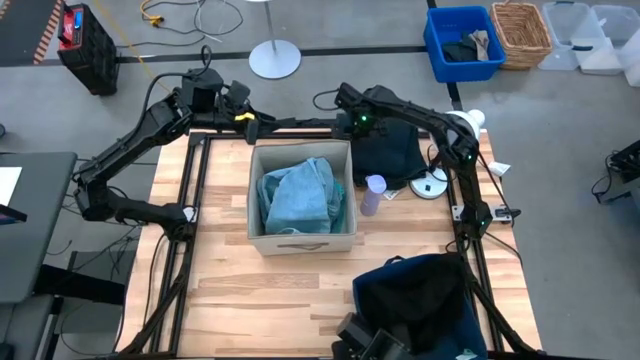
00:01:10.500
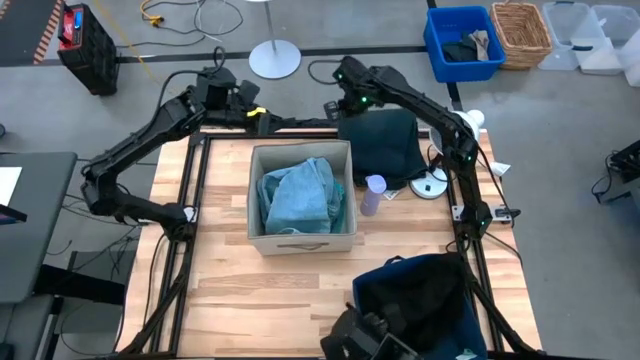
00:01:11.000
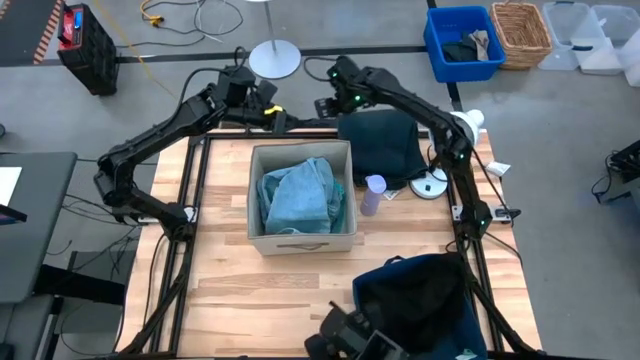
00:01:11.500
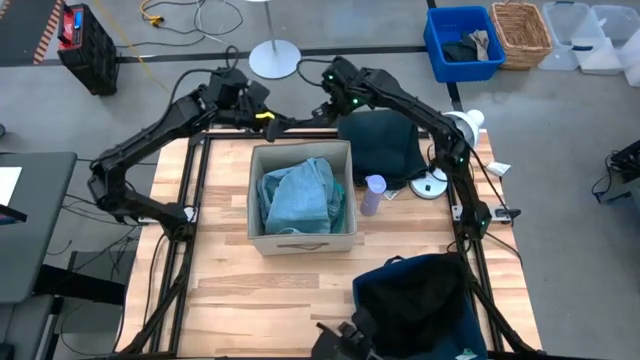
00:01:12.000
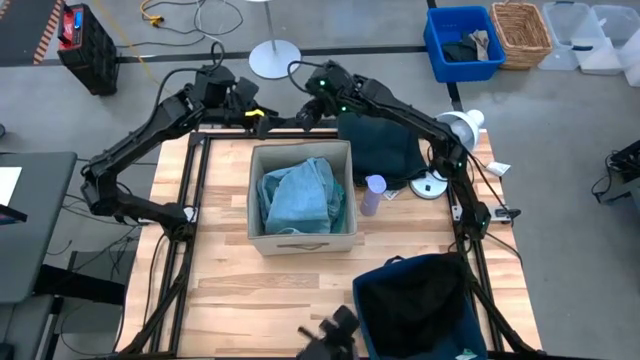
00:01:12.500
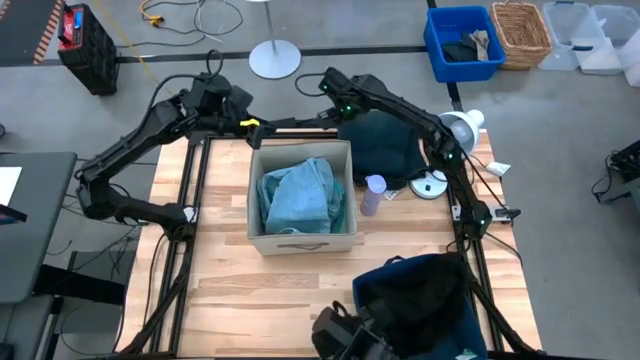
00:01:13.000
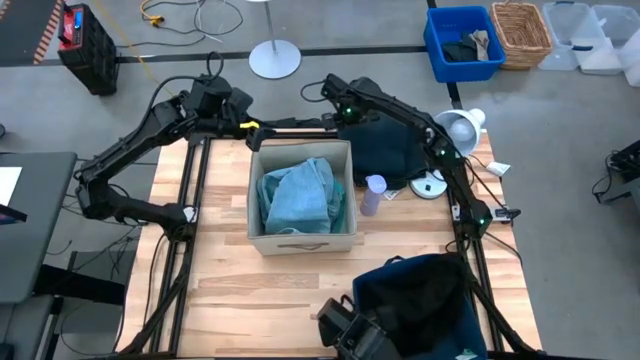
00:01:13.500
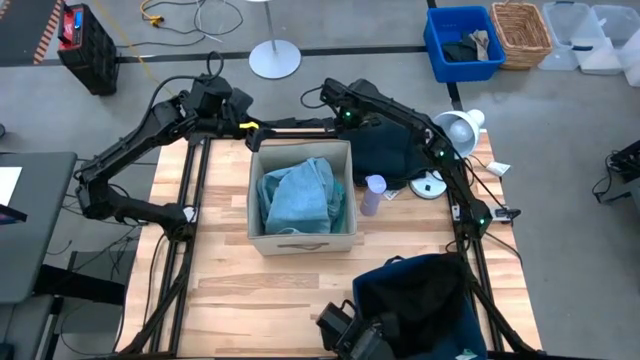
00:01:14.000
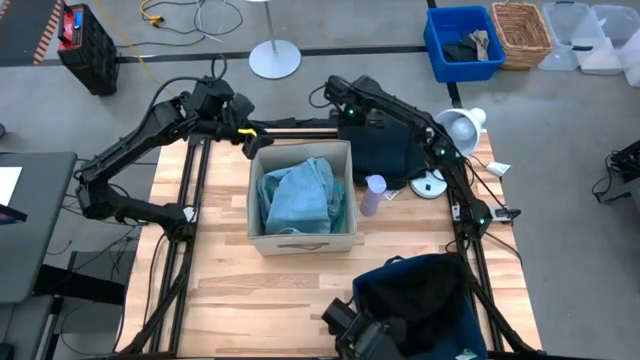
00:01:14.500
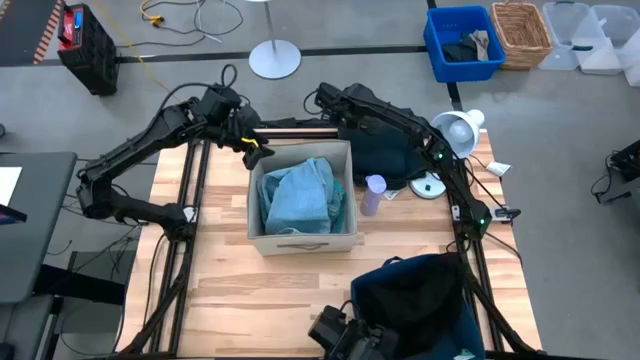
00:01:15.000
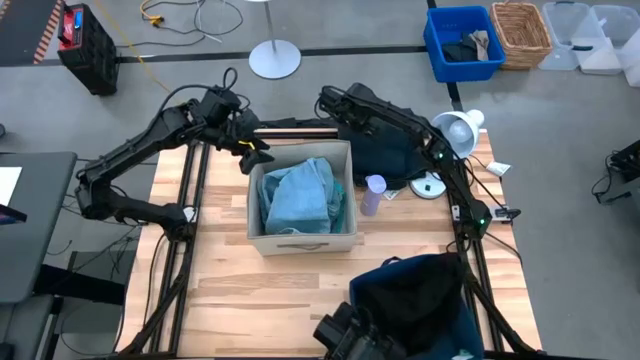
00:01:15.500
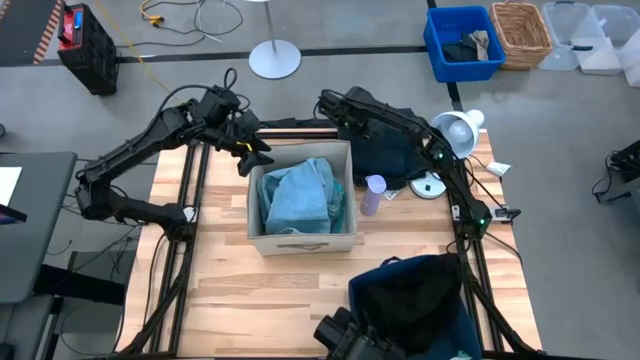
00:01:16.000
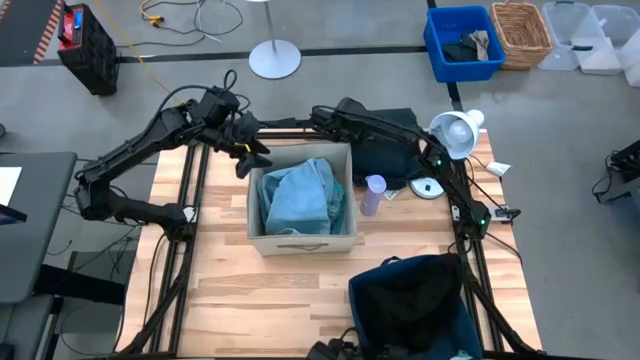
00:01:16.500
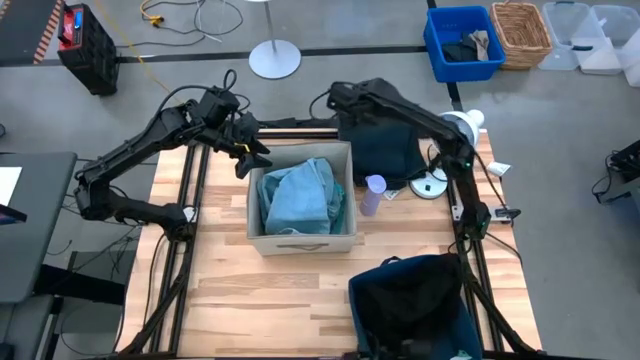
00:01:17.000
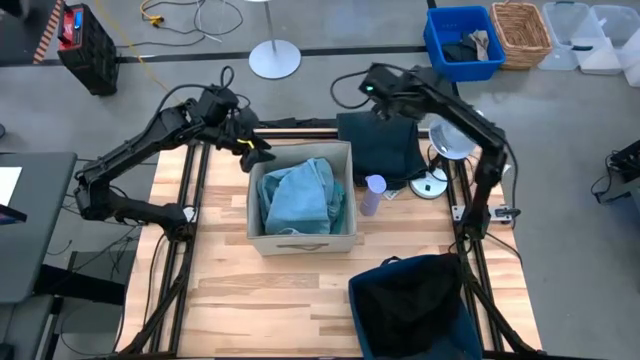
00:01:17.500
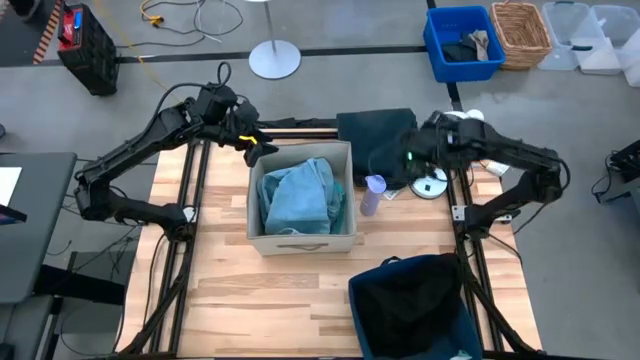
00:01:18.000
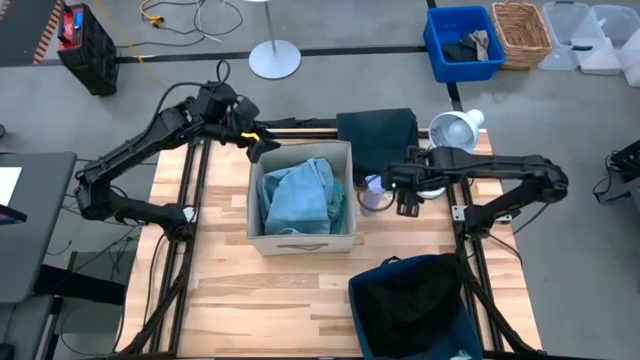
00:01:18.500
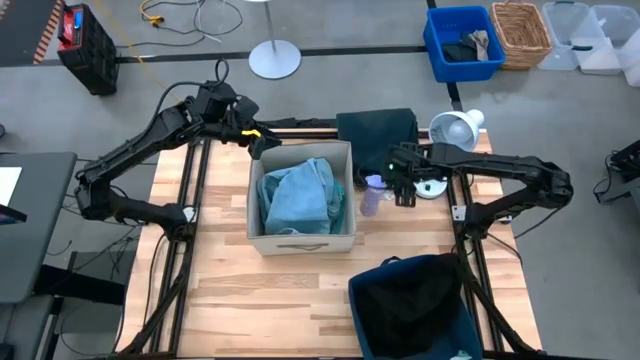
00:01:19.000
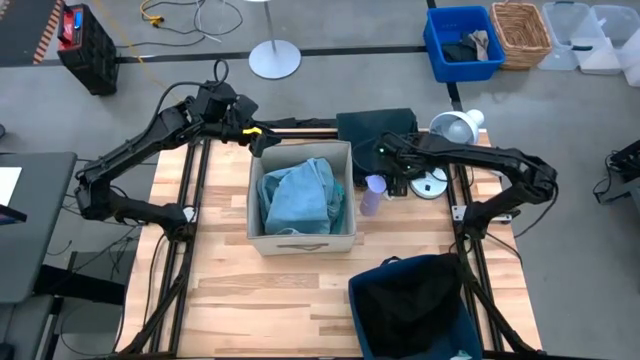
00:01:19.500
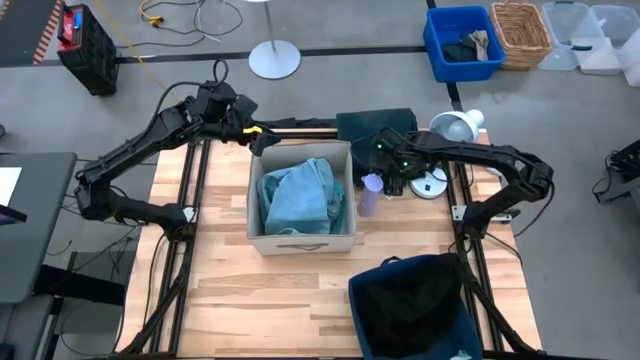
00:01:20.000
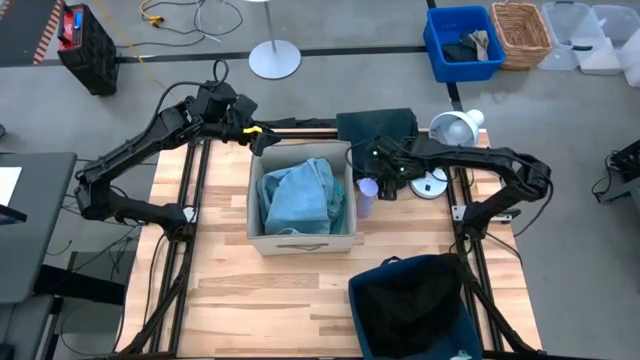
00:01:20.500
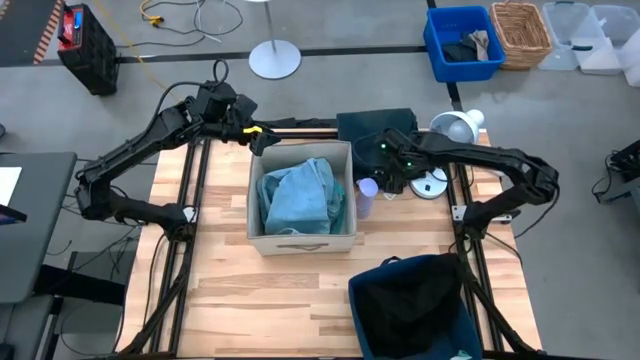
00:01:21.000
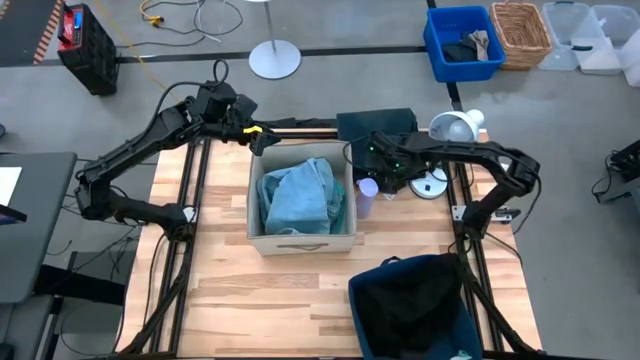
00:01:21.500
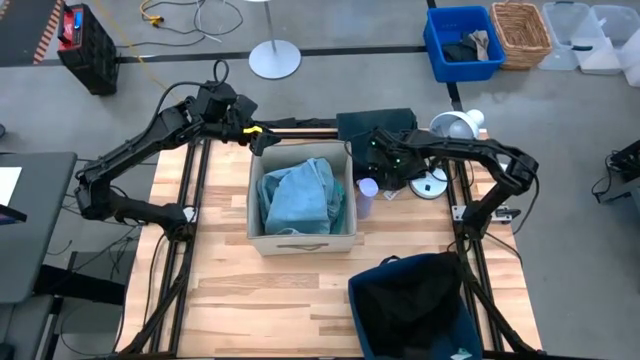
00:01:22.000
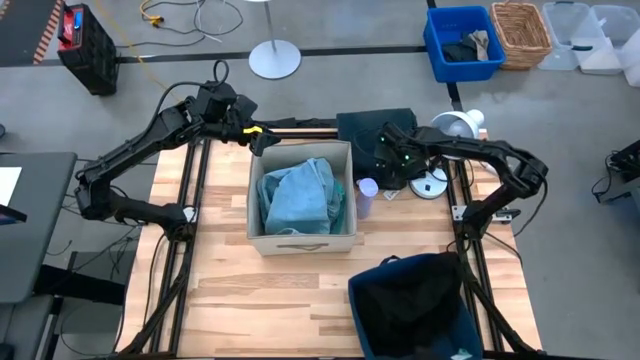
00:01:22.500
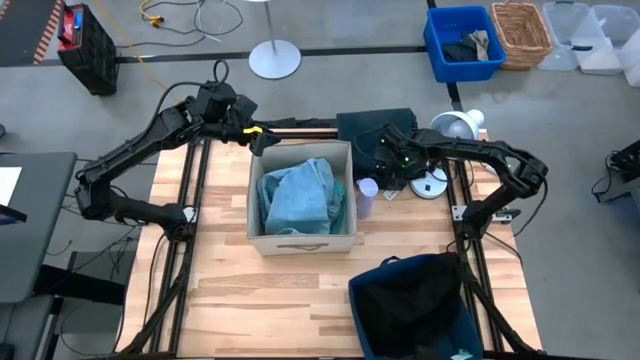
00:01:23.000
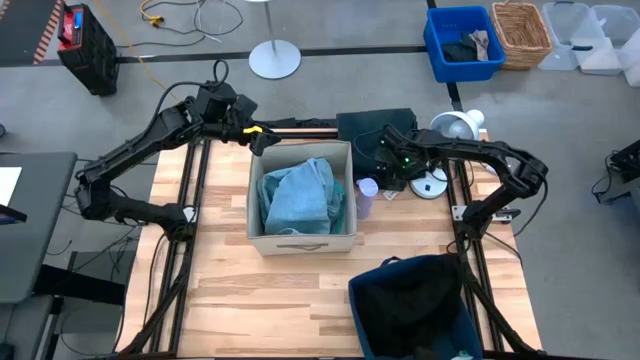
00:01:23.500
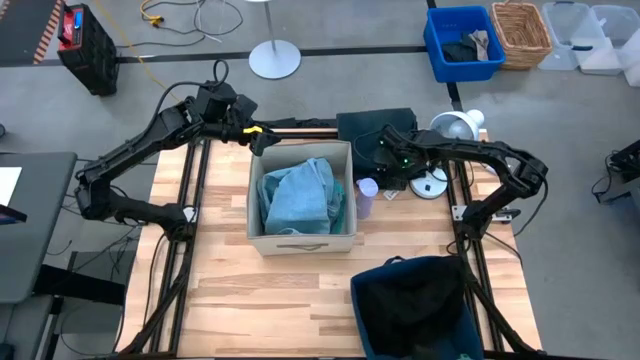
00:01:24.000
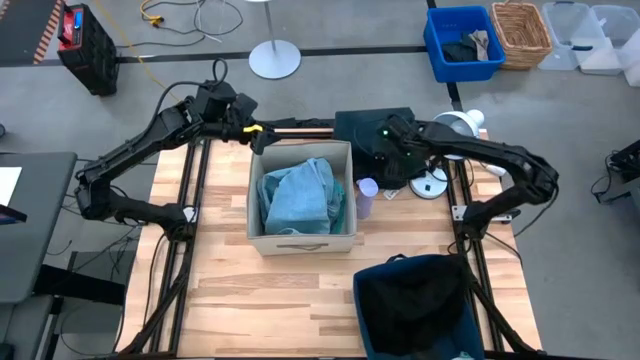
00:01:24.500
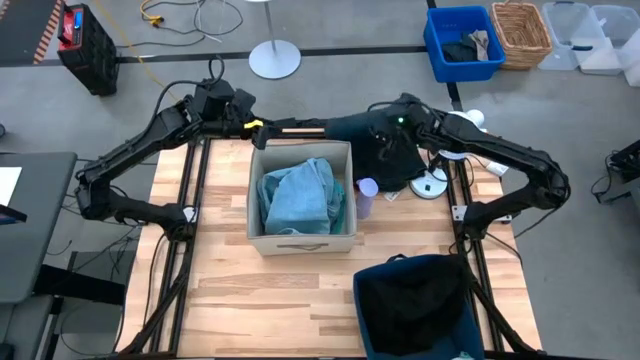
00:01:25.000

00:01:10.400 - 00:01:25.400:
Task: Sort clothes
Put the black pants into the blue laundry bin

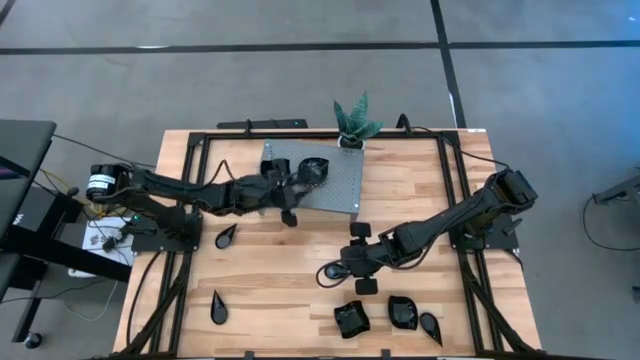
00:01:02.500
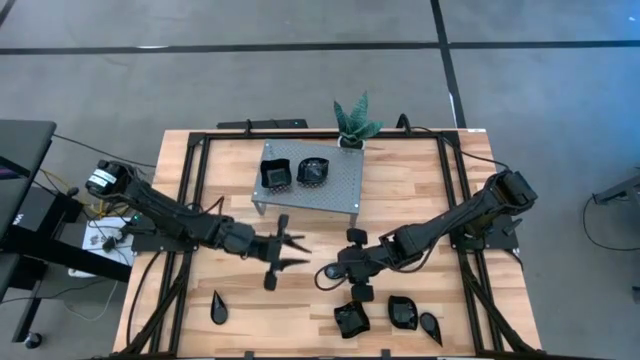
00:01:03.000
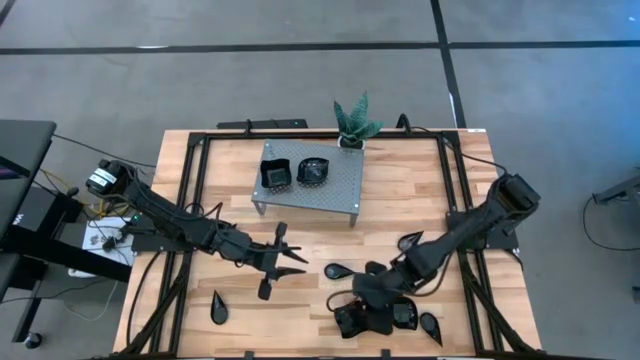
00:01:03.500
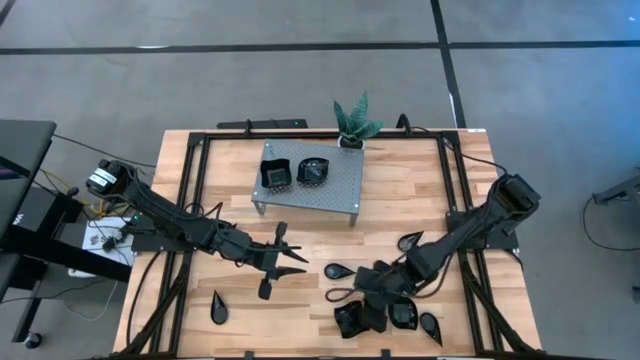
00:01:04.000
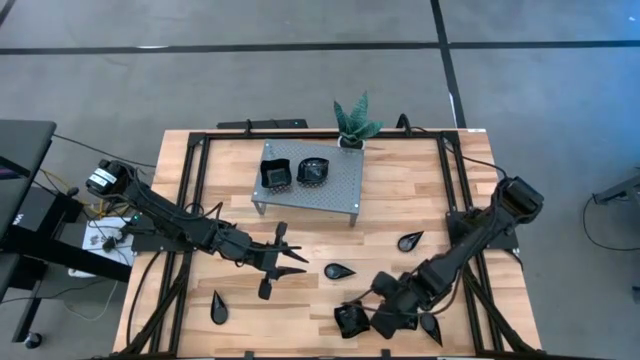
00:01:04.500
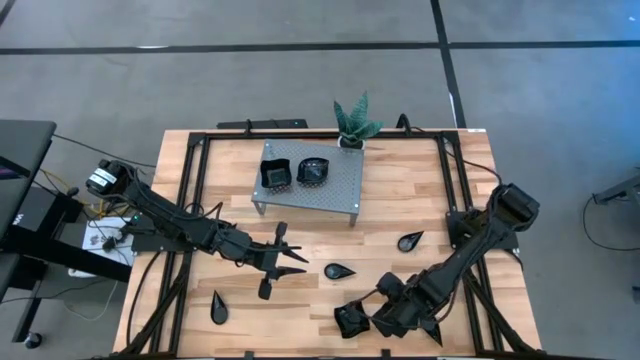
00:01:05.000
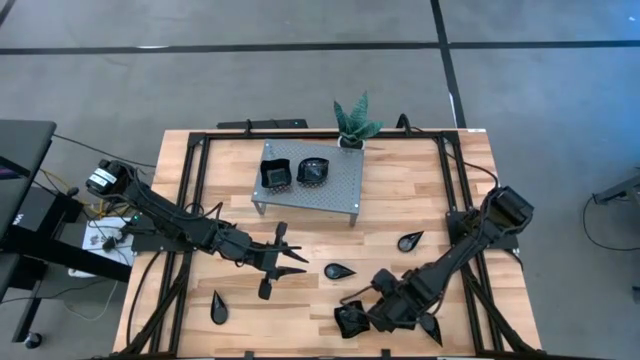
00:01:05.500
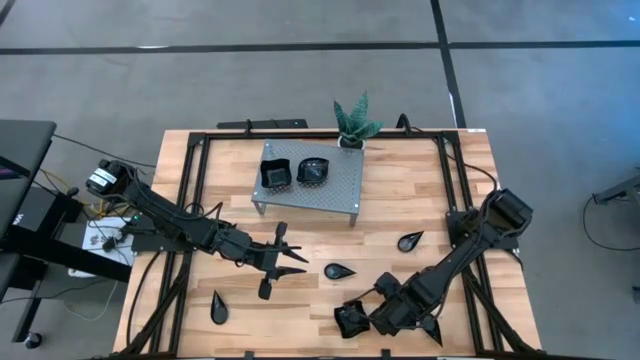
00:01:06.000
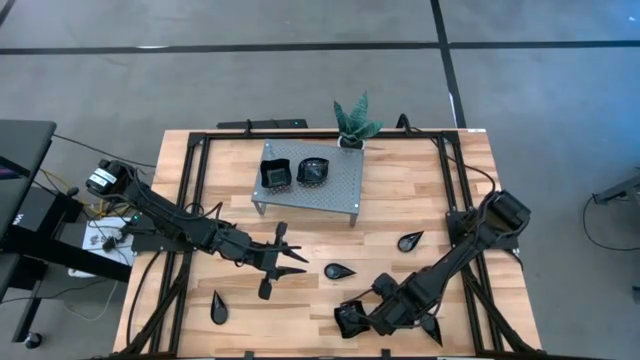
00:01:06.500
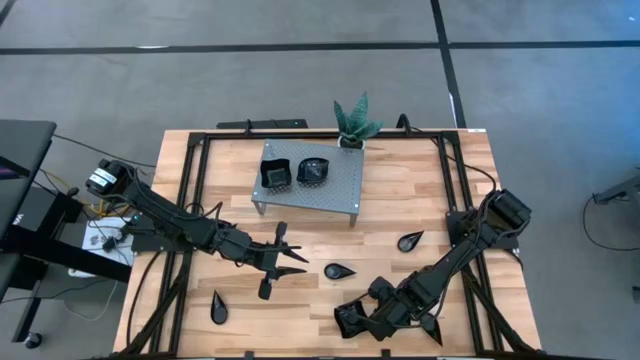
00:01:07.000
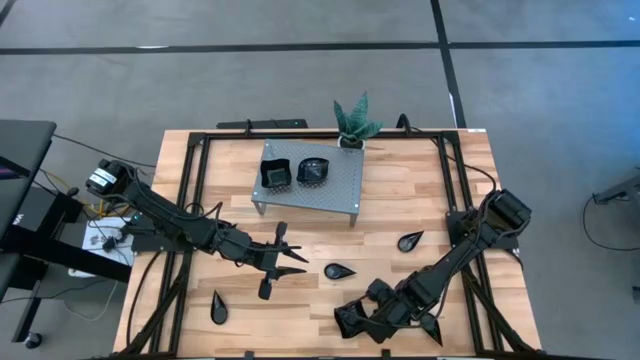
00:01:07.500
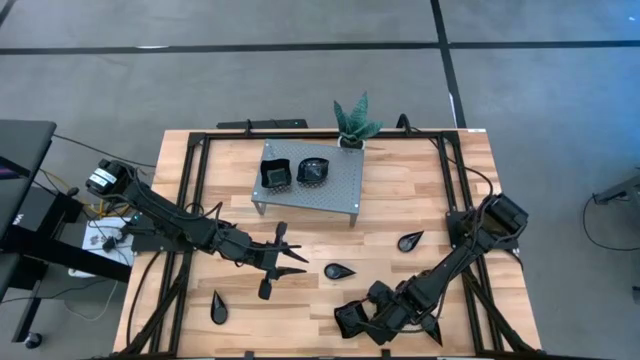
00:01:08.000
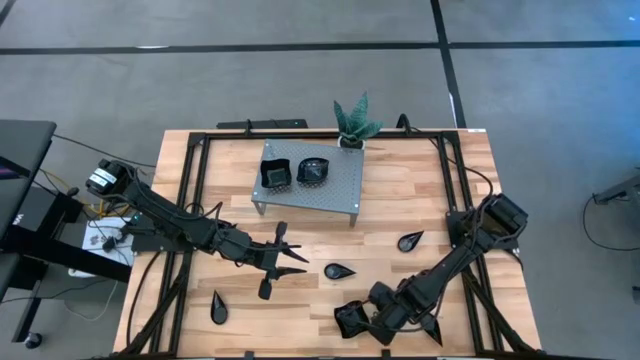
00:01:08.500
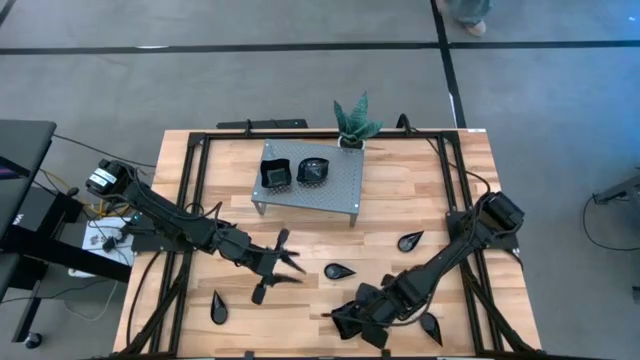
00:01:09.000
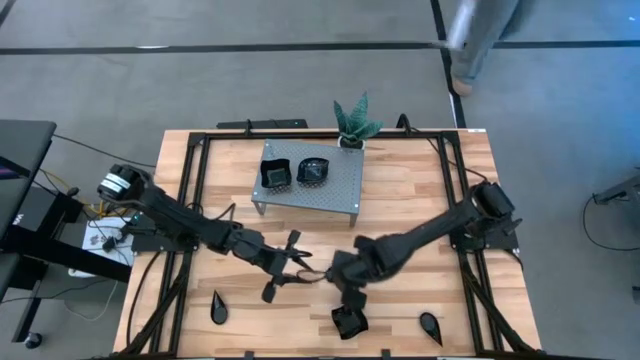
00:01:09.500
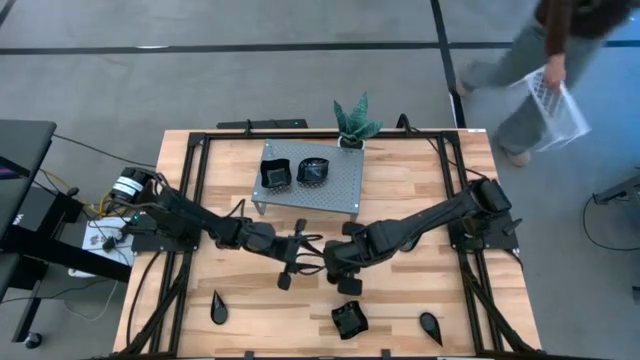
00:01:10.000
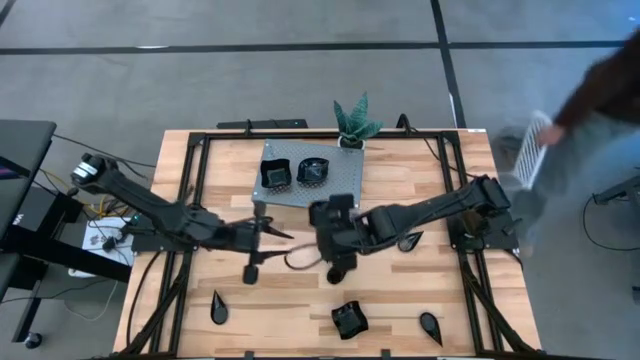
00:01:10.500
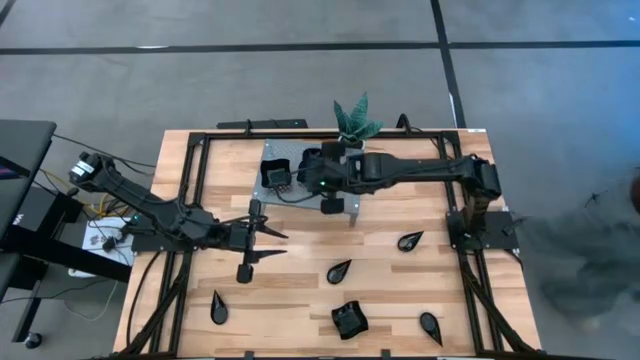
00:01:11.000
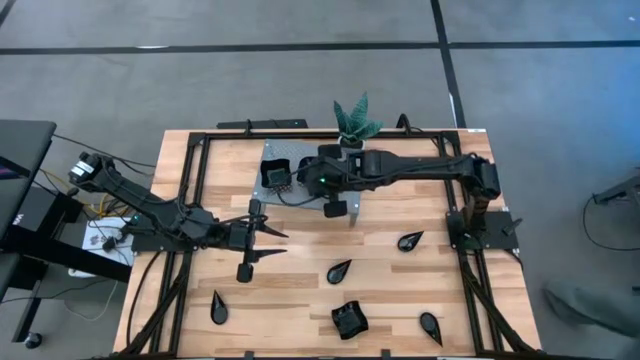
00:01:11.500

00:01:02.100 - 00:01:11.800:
Task: Pick & Place Mini shaped plates
Stack the black leaf shaped plate on top of the stacked black leaf shaped plates on the shelf
